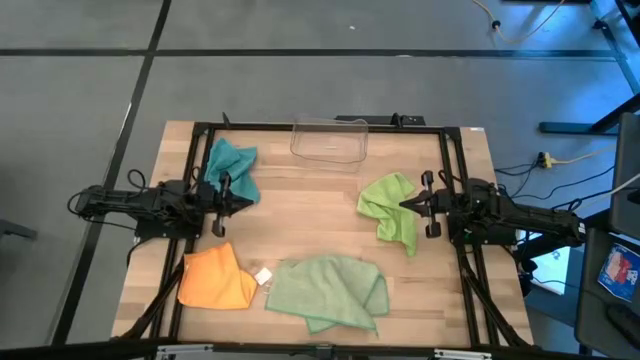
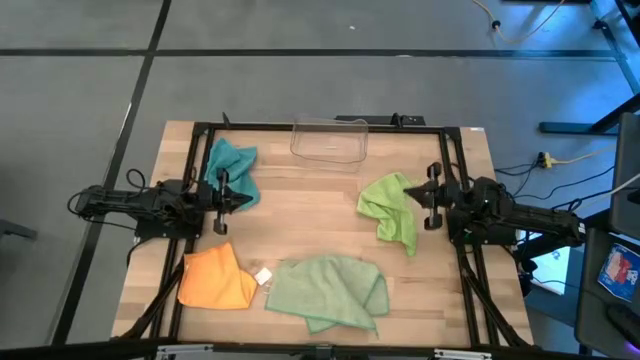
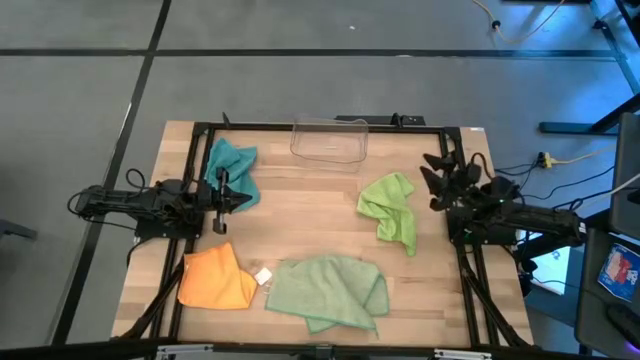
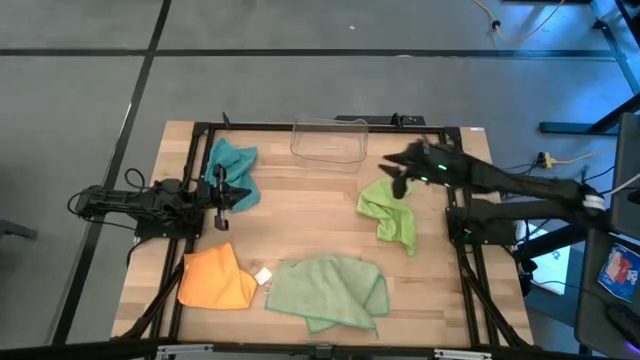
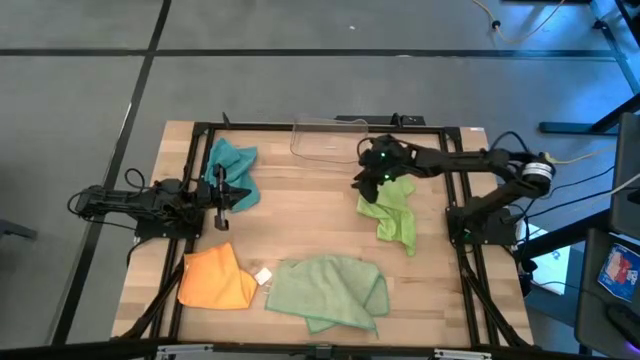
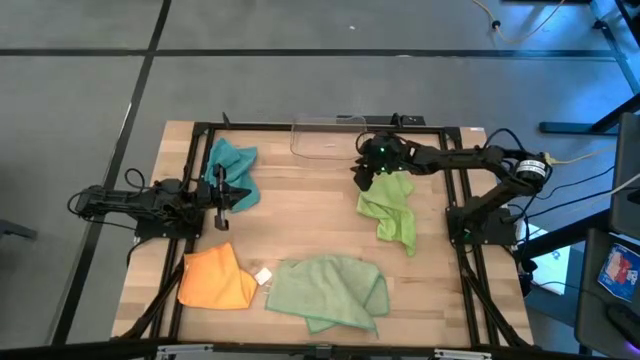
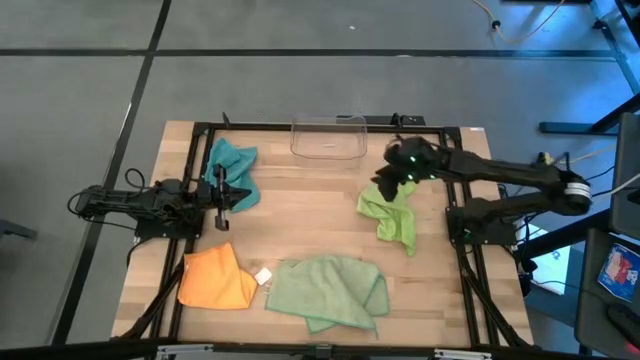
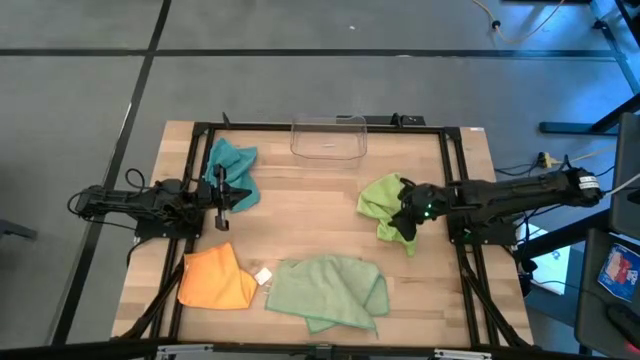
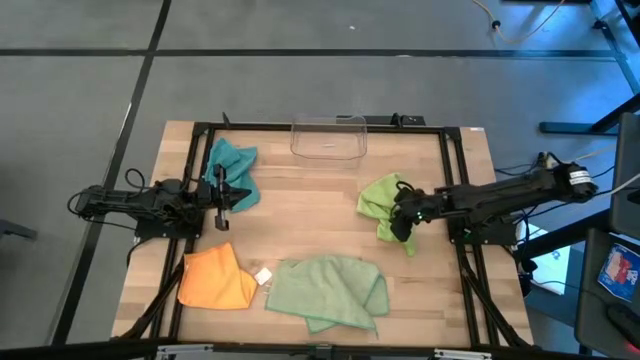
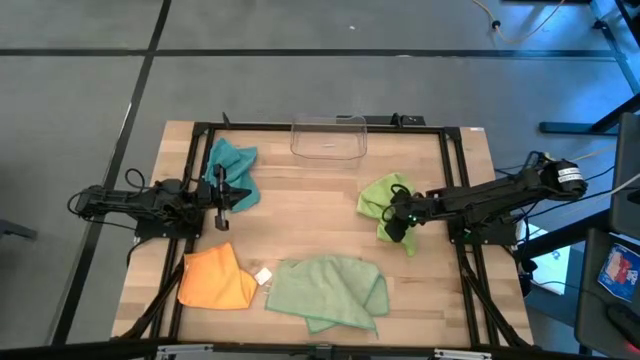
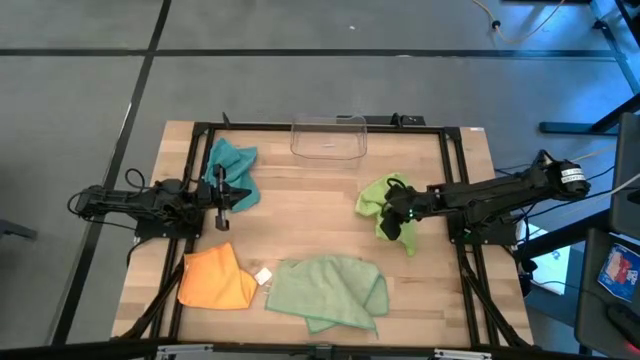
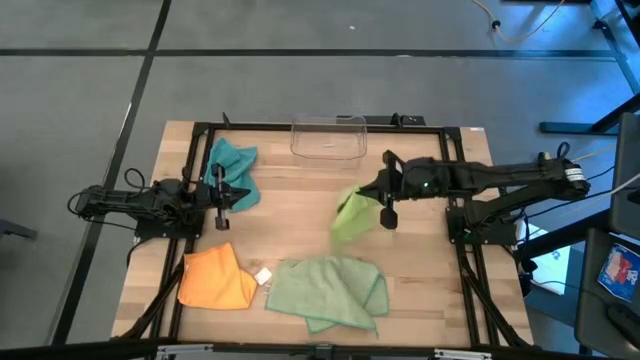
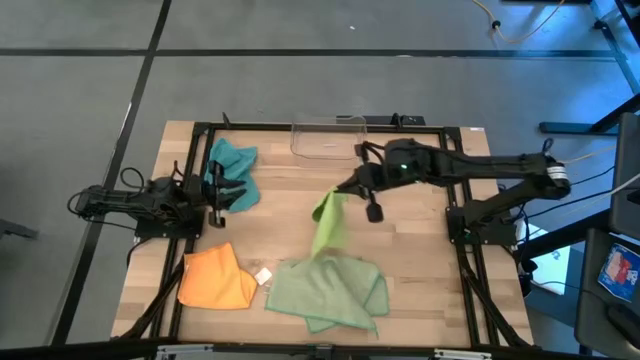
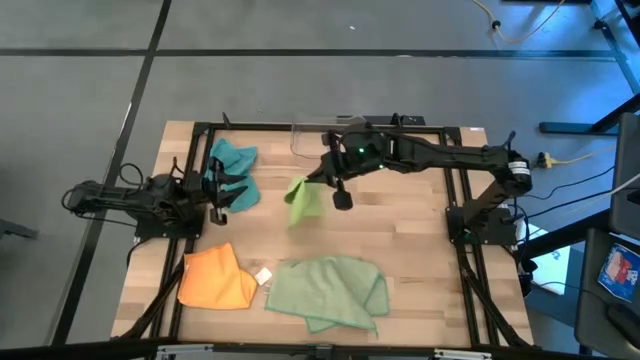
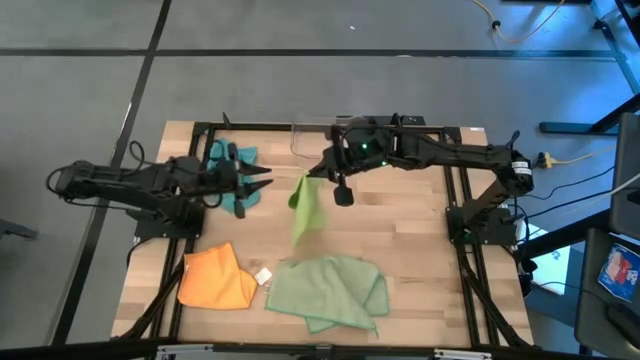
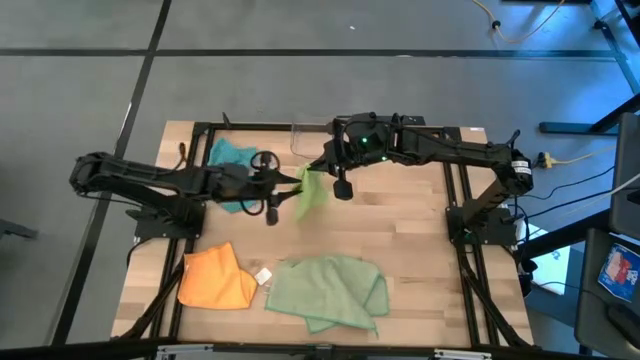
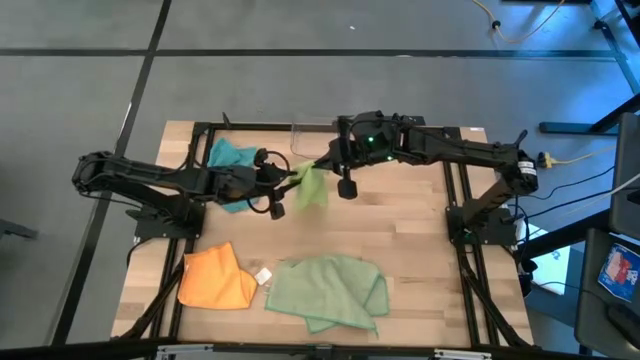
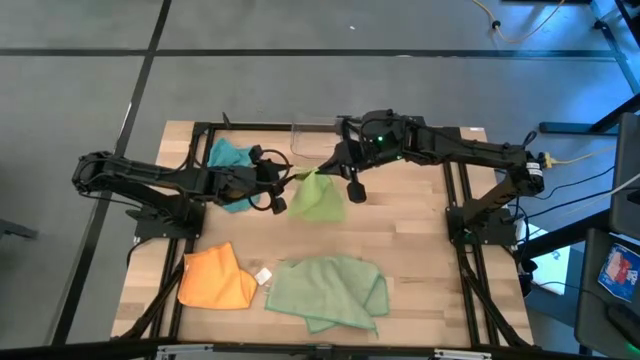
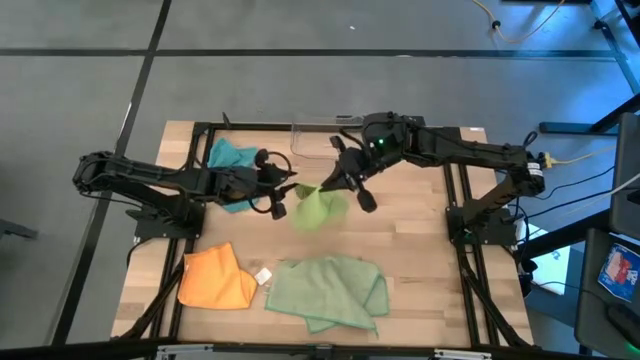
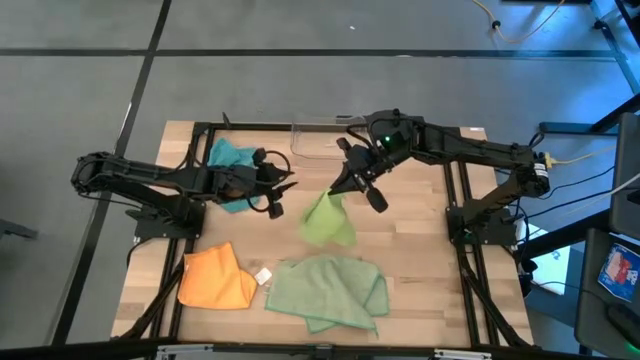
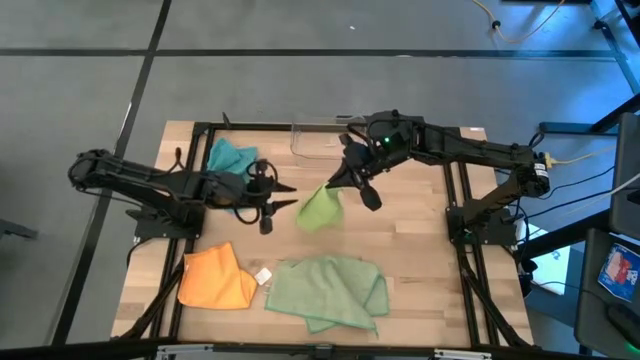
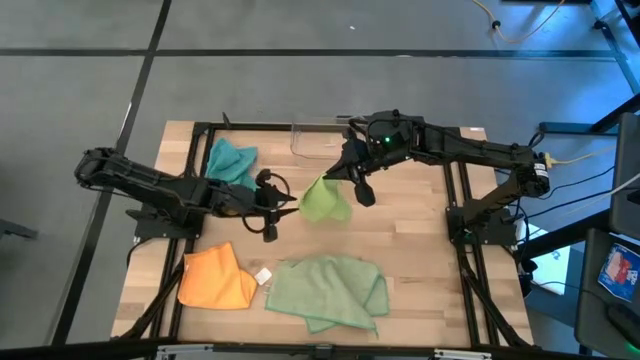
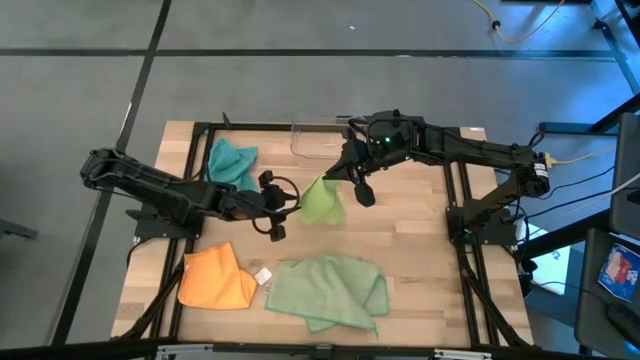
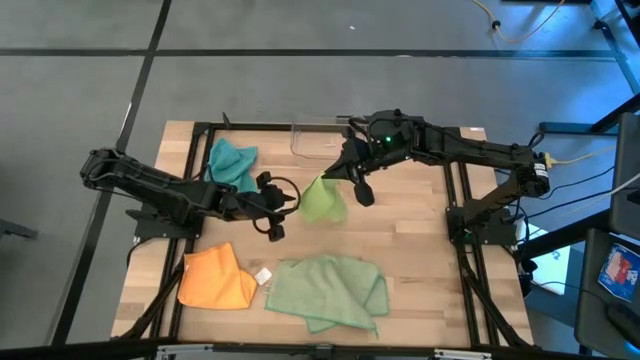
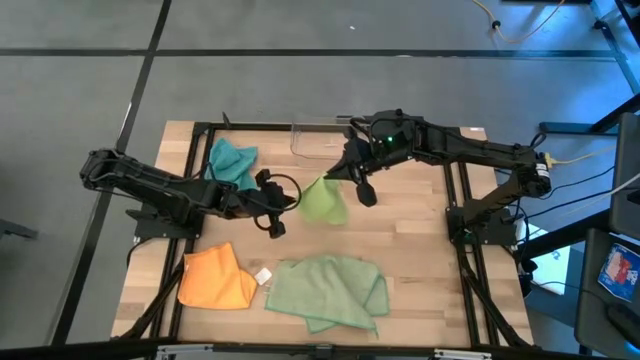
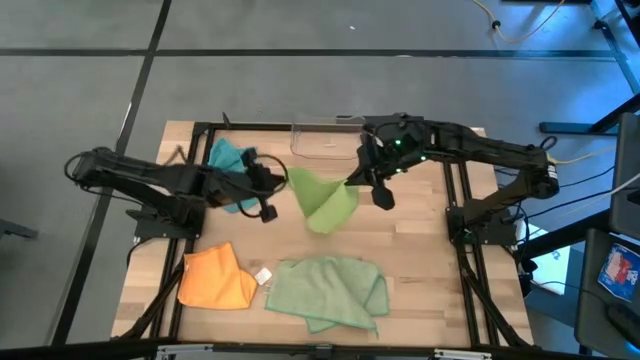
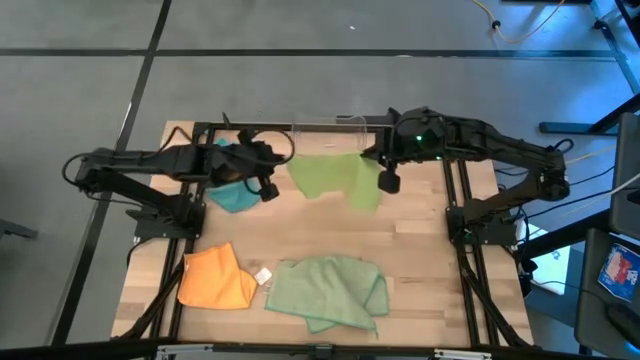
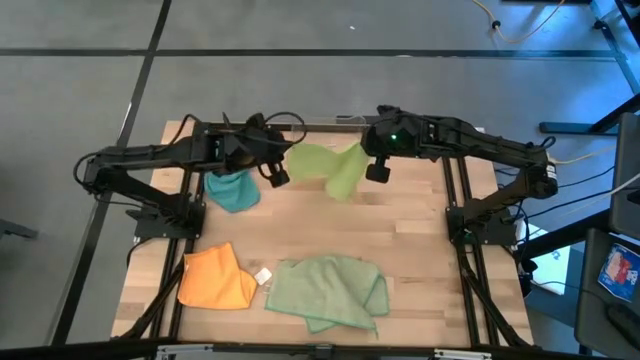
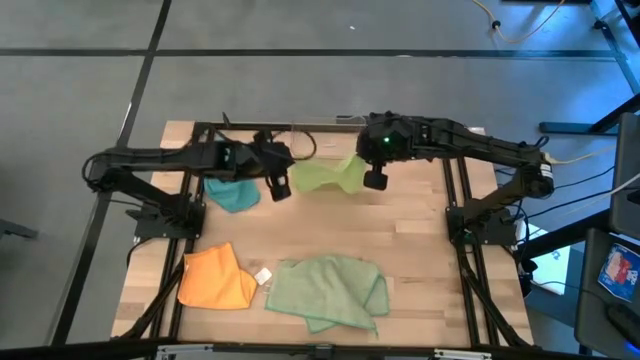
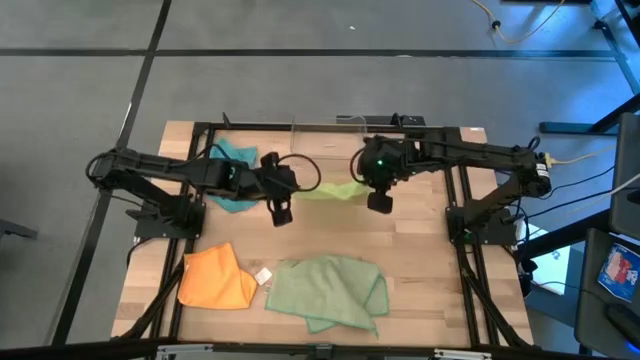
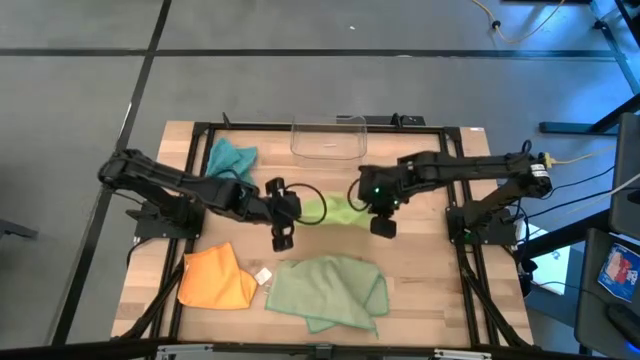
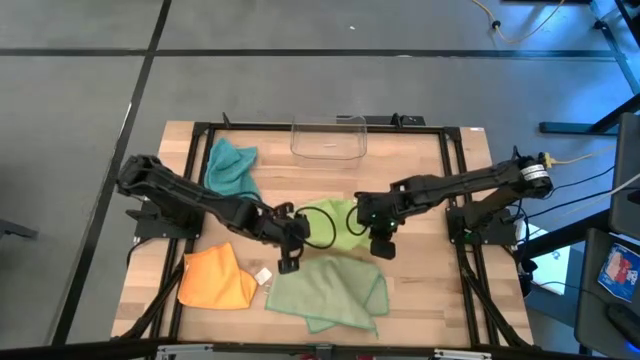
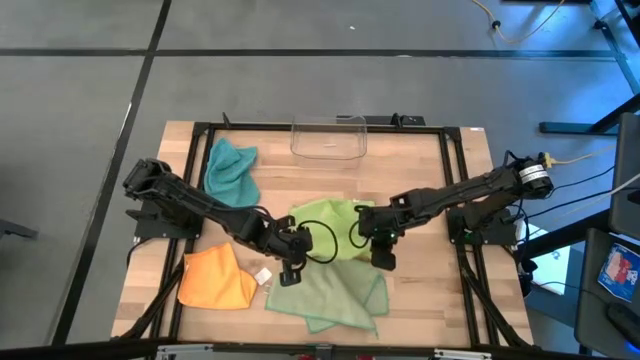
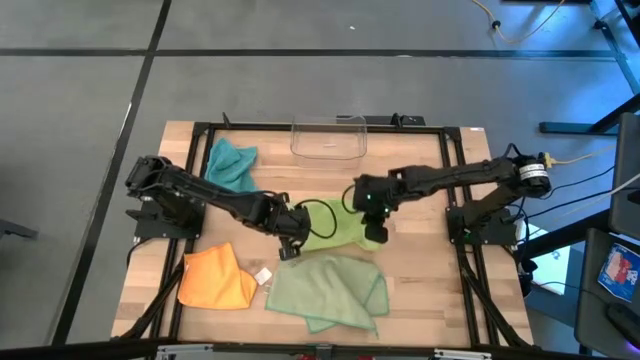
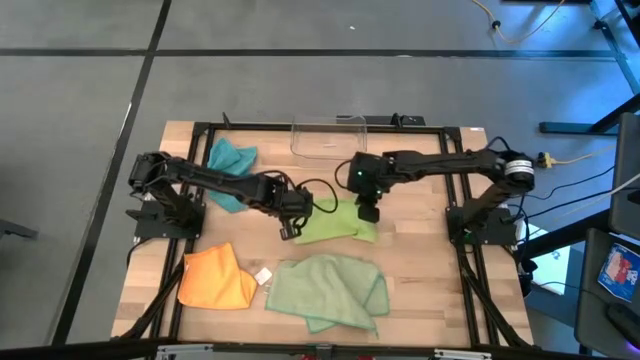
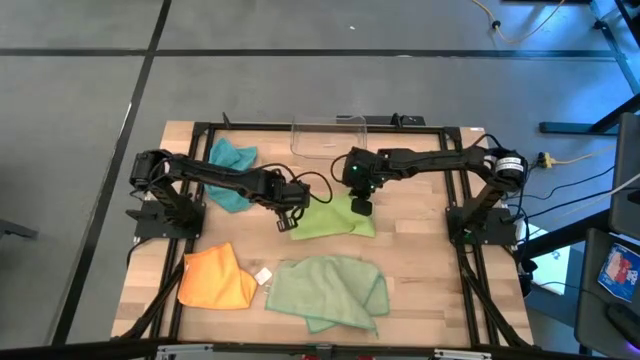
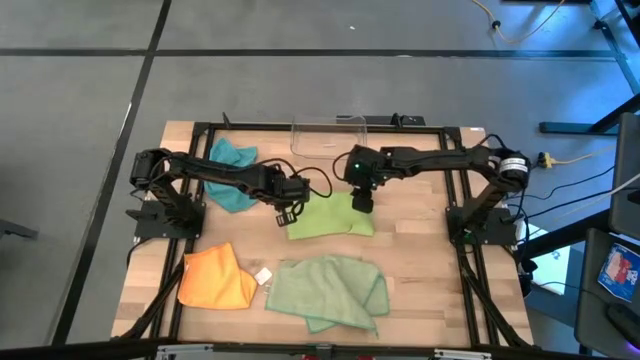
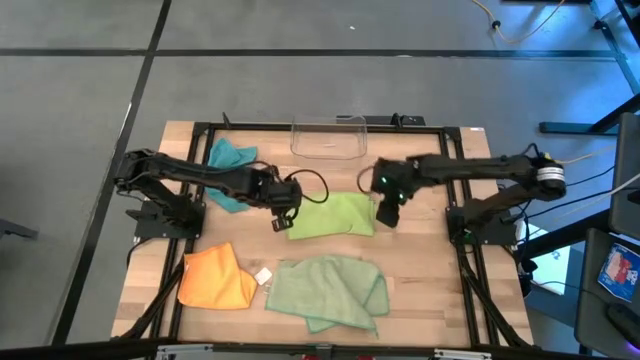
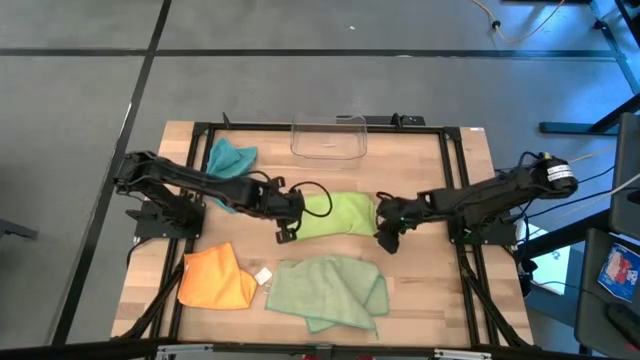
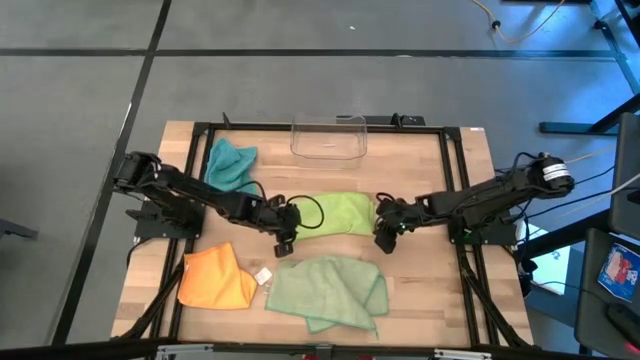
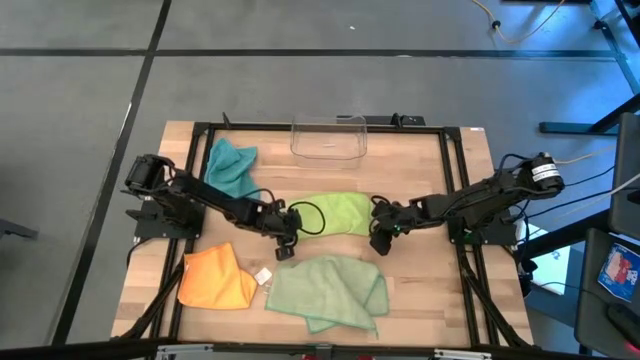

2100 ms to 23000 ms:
Task: Fold microfiber towels
Fold the light green microfiber towel
